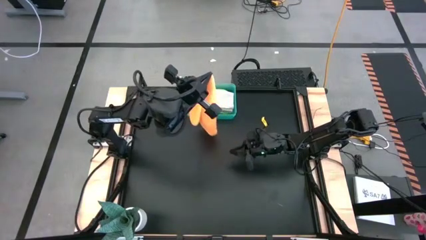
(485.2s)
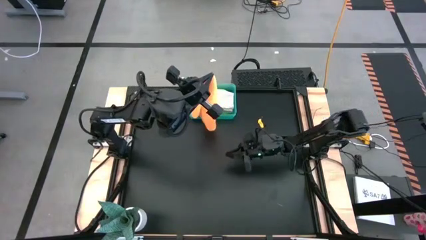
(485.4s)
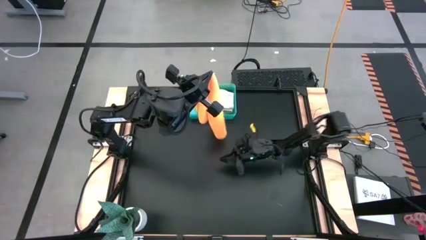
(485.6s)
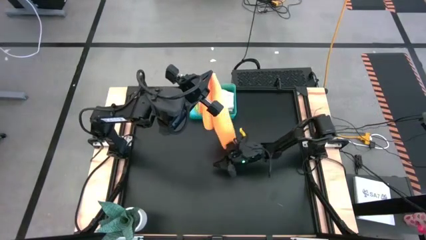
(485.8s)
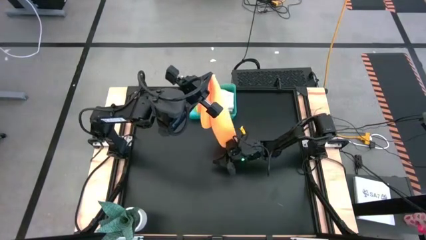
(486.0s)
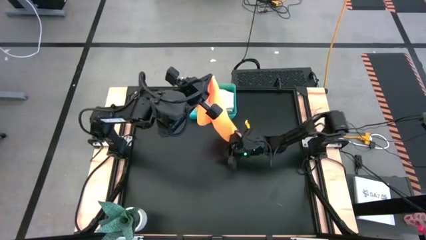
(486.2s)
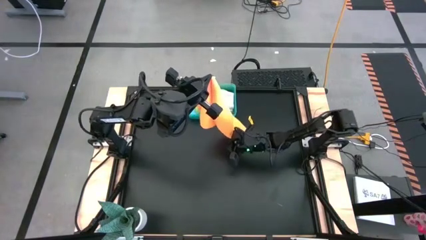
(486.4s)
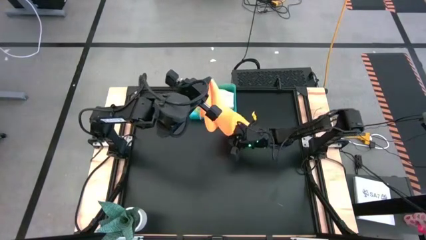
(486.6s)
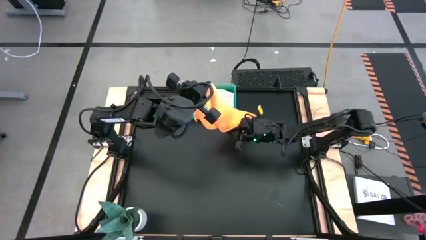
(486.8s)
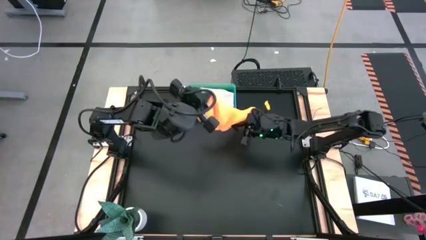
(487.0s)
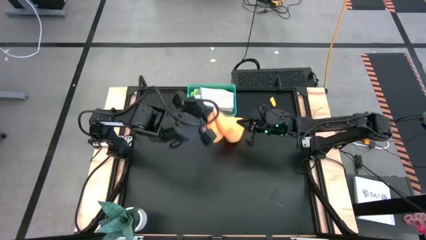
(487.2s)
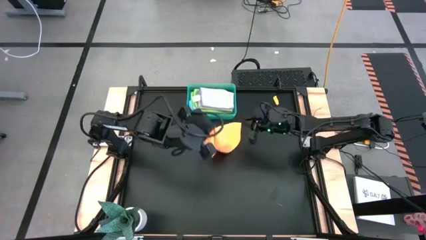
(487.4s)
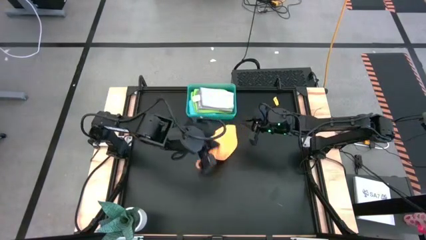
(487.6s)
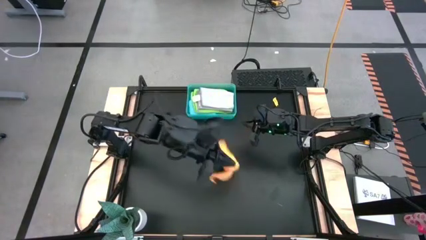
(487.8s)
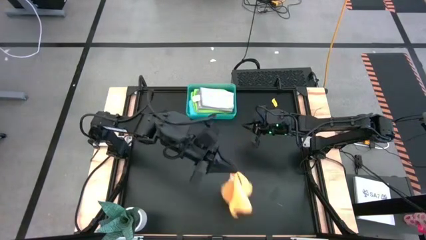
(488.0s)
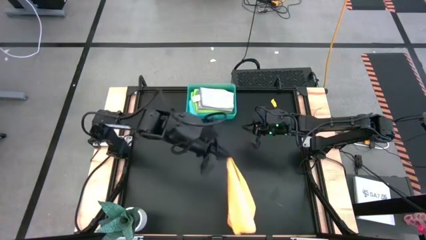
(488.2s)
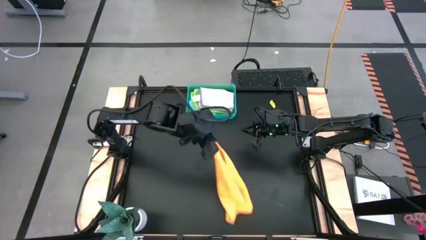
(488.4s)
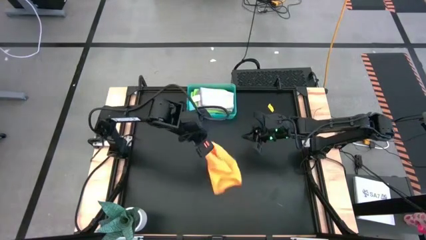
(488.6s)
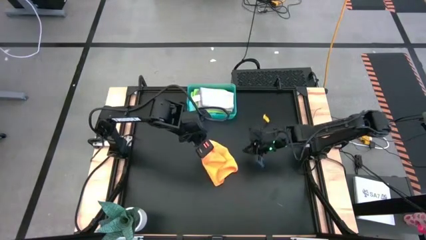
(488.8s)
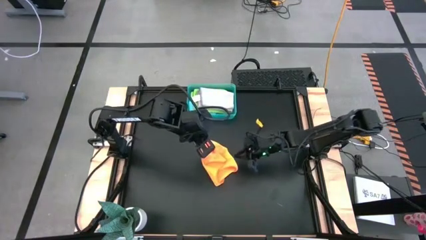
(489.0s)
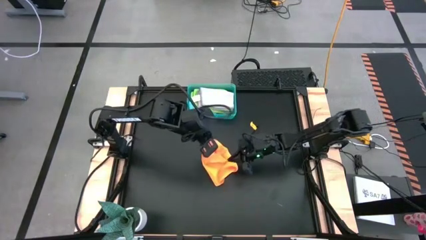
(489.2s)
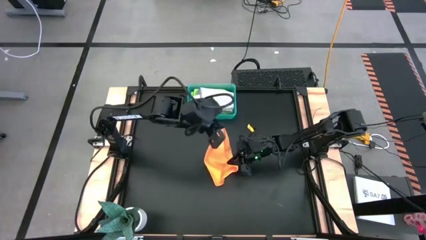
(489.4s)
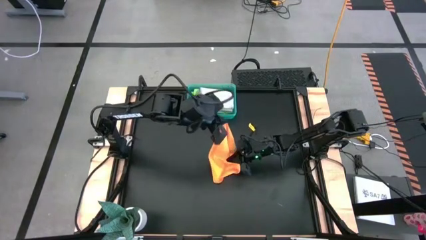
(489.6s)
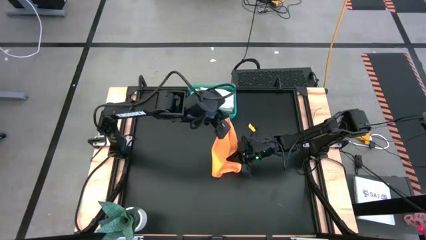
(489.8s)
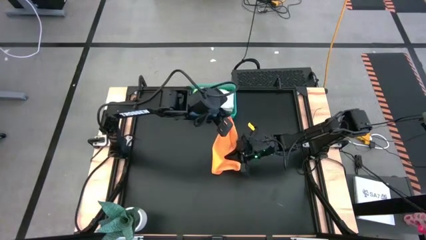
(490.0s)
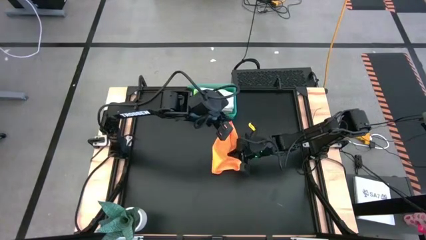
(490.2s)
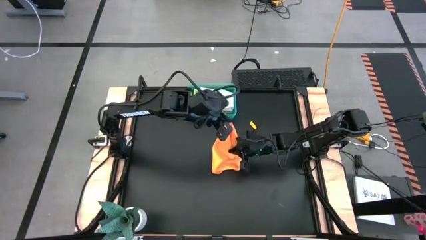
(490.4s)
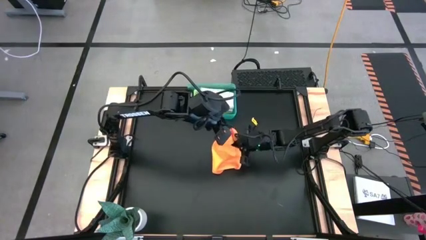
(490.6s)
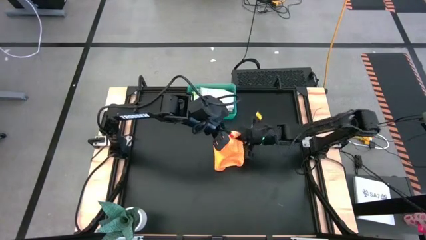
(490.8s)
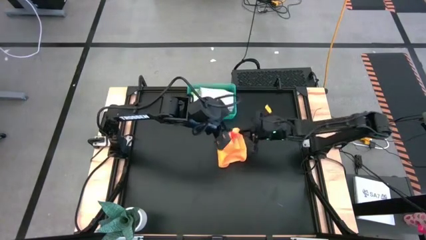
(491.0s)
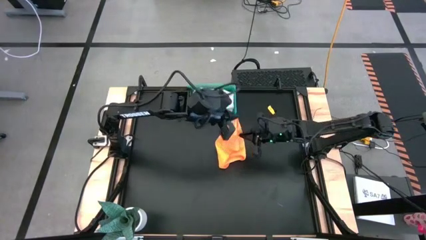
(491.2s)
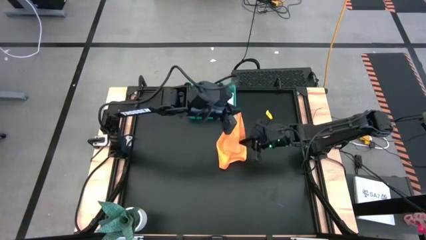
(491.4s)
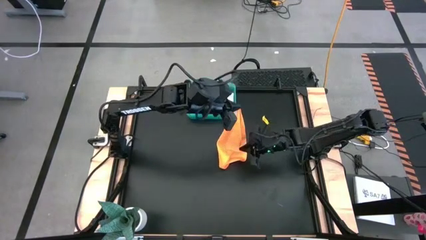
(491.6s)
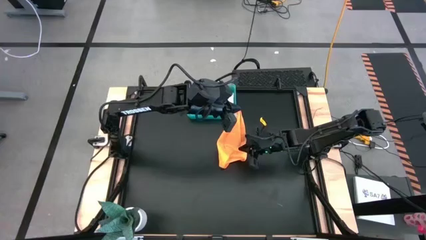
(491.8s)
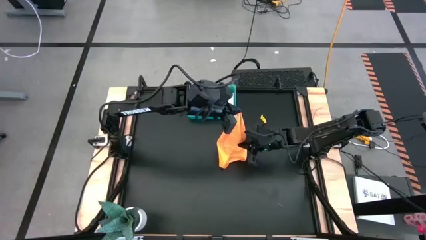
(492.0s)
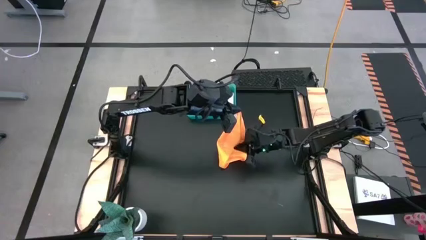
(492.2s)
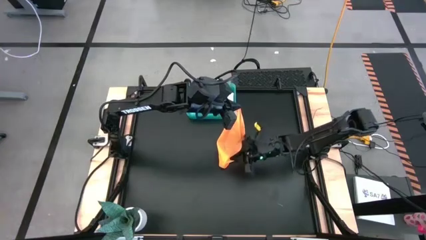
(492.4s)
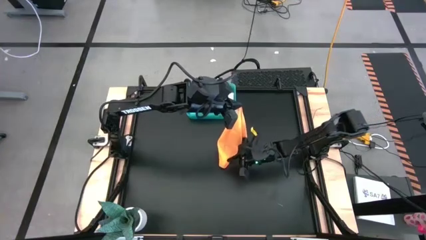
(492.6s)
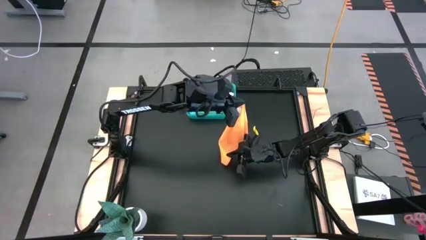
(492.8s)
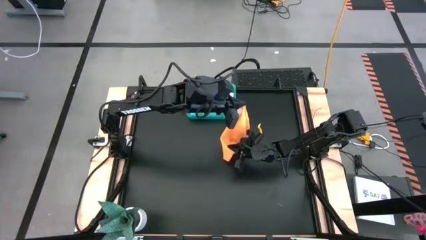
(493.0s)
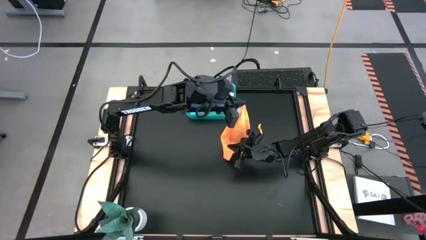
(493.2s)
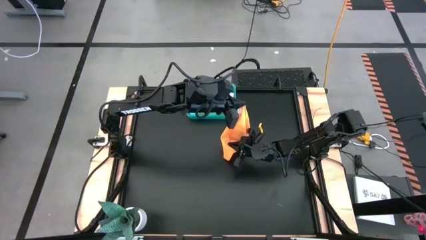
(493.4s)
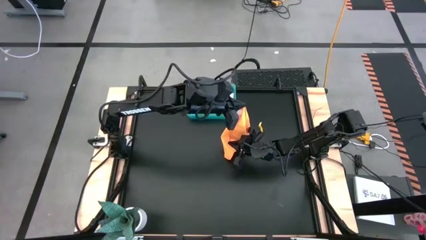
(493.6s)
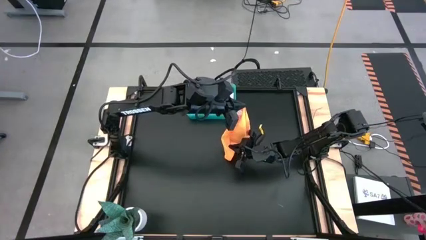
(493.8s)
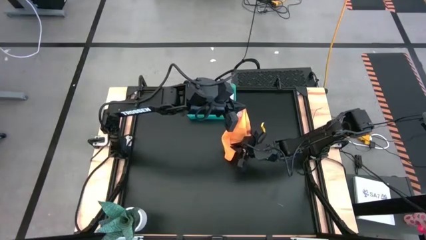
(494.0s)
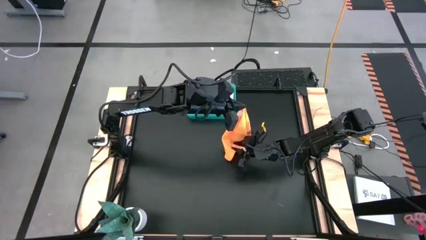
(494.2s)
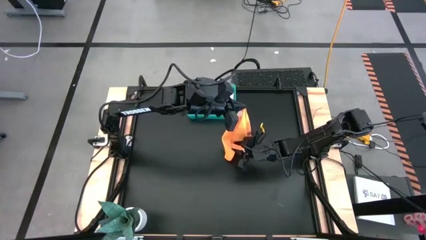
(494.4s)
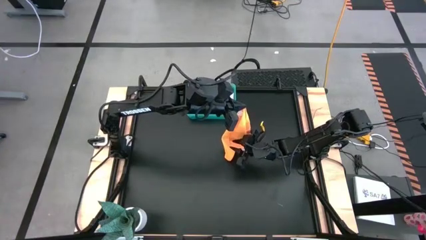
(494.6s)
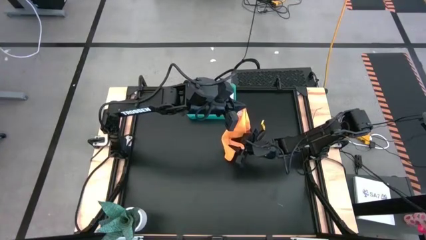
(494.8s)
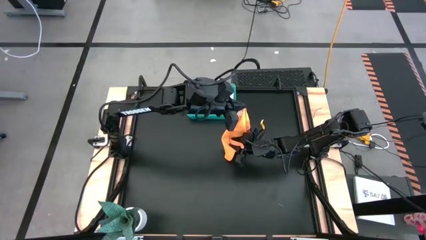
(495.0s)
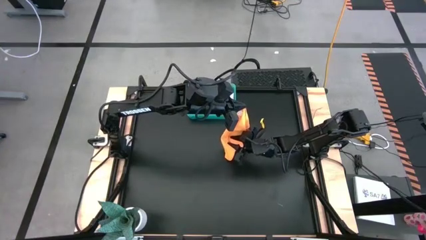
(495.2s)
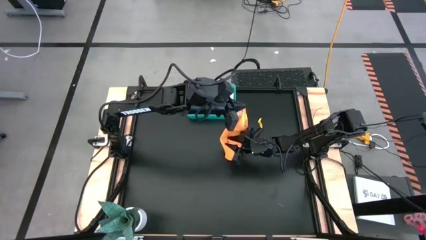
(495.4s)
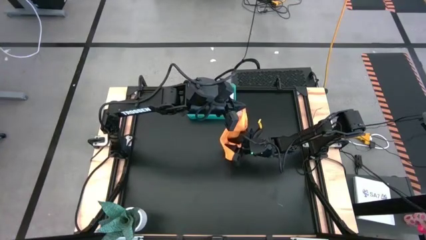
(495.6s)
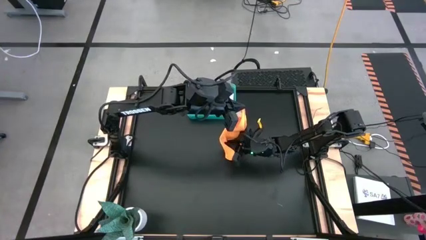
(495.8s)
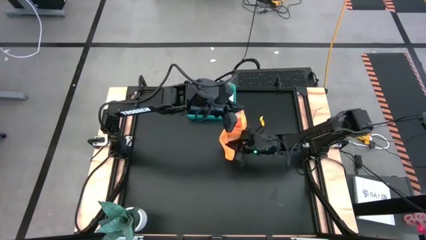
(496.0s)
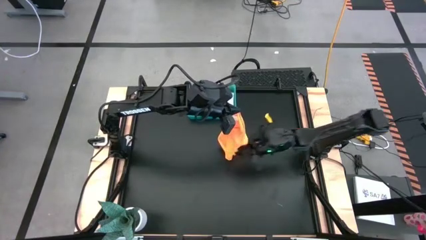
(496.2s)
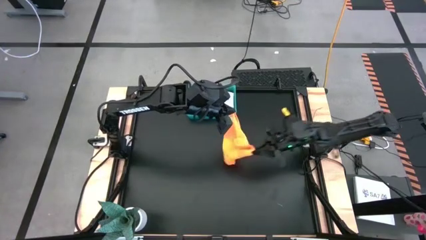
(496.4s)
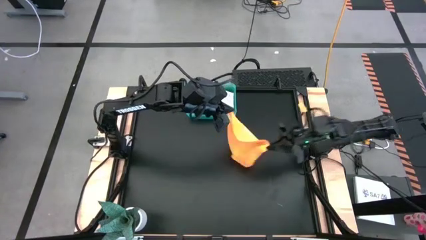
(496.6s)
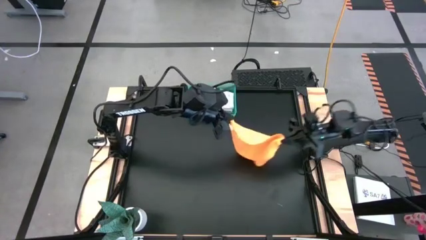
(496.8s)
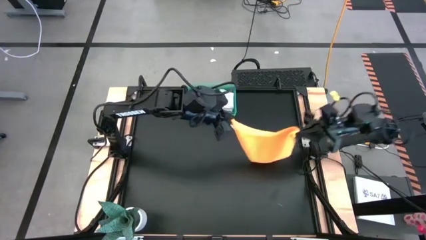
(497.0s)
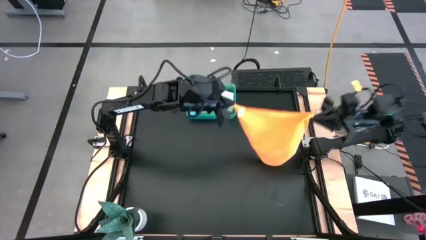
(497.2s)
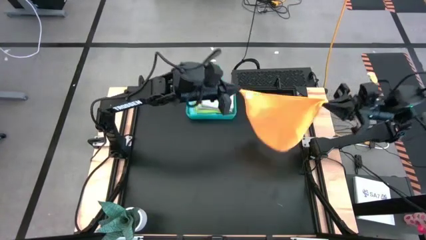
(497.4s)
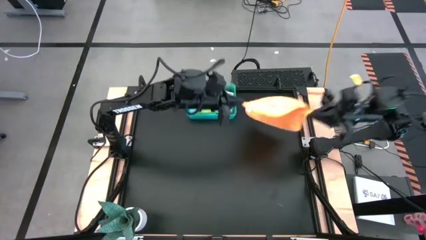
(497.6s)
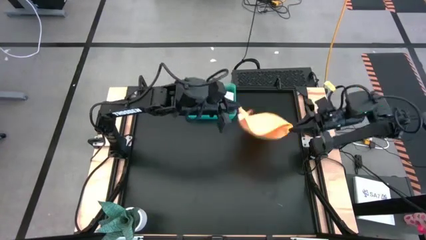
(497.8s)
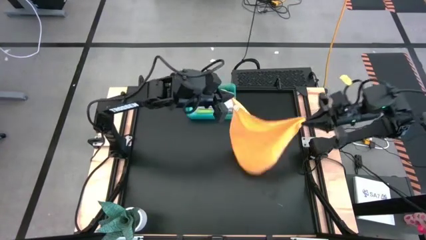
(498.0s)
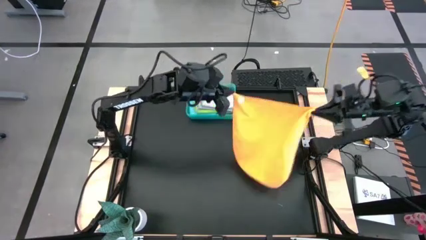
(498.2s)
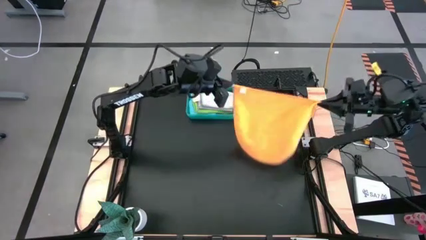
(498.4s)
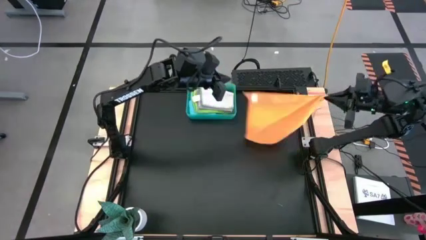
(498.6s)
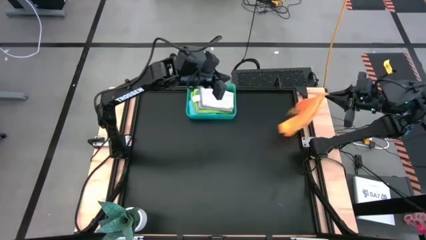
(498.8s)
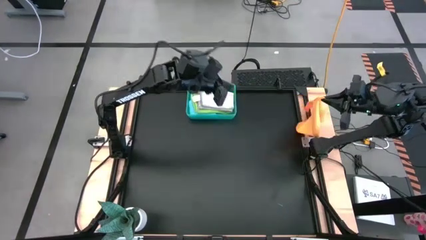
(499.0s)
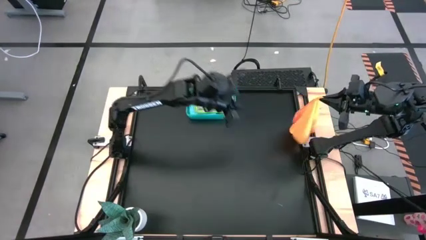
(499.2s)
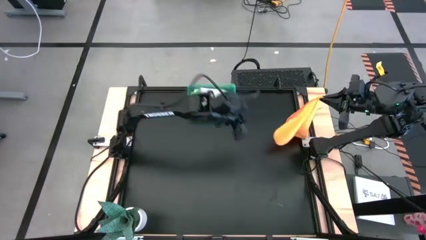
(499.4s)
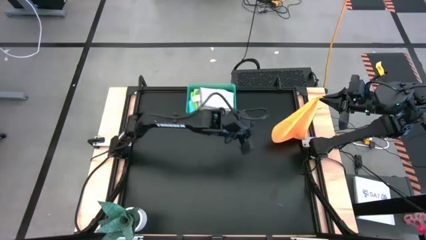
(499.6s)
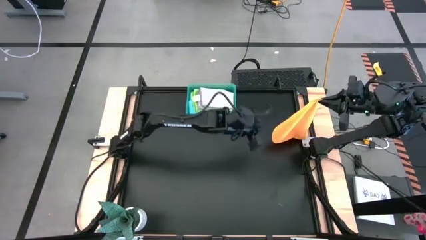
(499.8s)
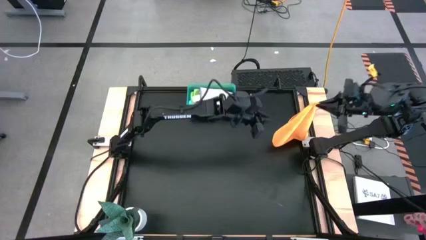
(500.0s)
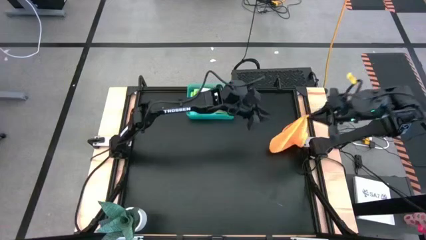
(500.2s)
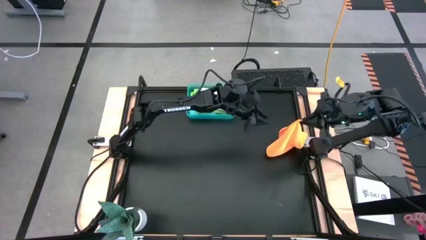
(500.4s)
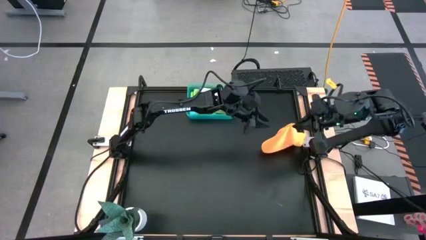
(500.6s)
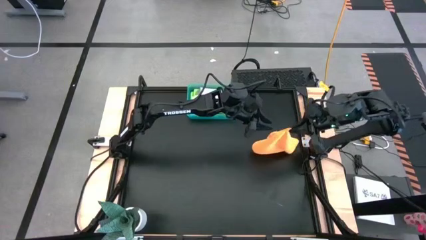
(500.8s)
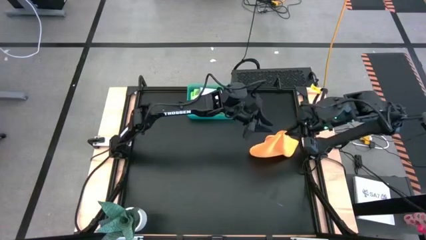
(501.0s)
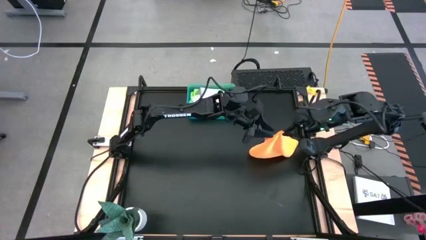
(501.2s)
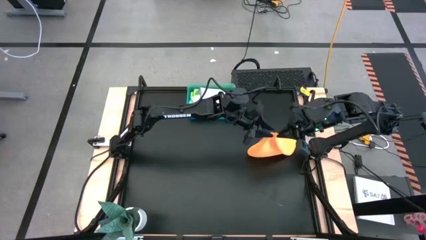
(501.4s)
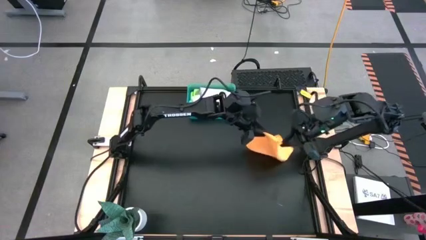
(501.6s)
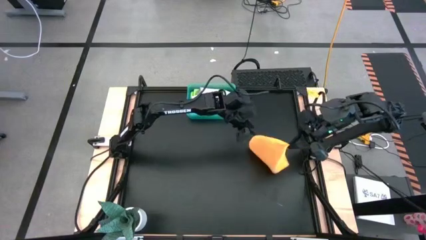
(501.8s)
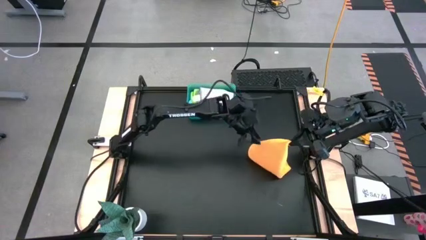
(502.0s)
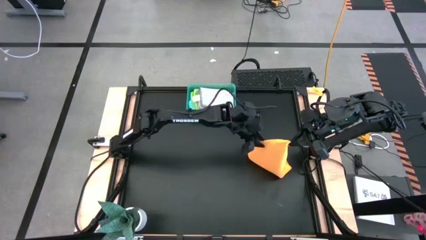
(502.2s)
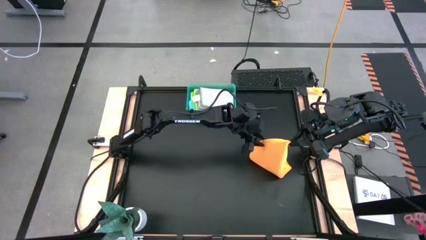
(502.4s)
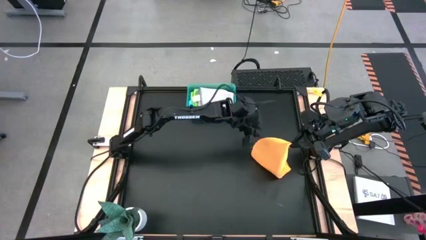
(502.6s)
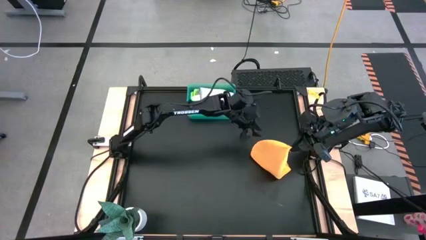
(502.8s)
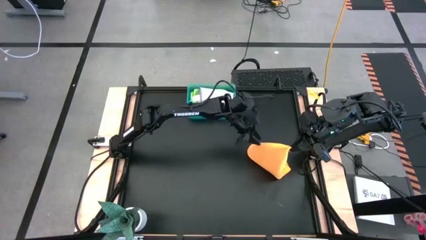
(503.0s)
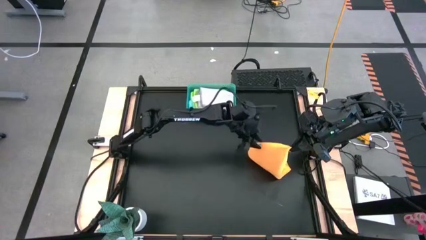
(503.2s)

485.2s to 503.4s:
Task: Fold microfiber towels
Fold the orange microfiber towel
